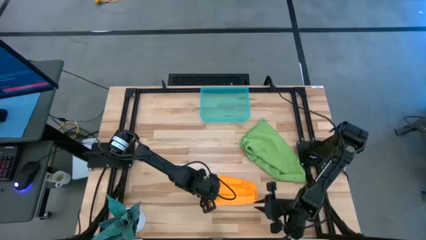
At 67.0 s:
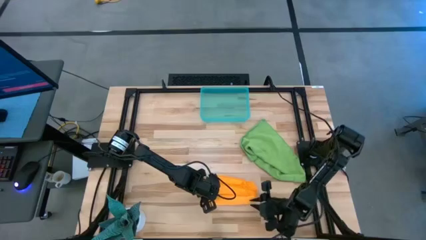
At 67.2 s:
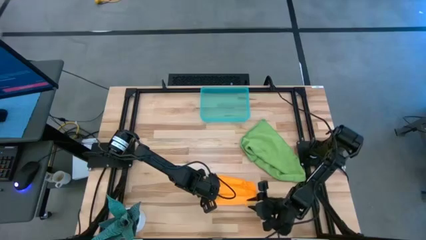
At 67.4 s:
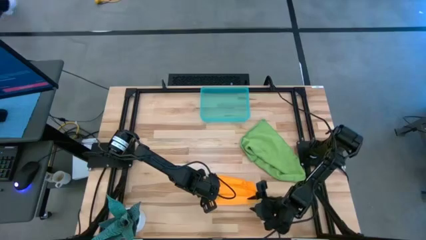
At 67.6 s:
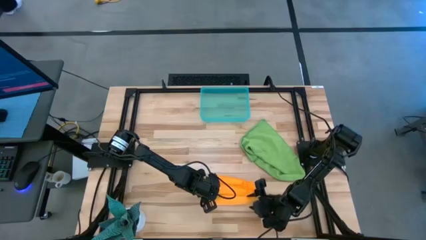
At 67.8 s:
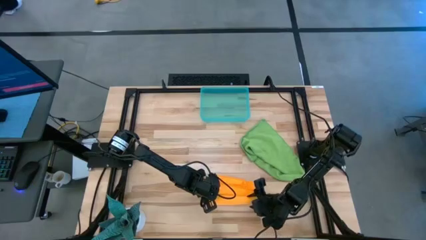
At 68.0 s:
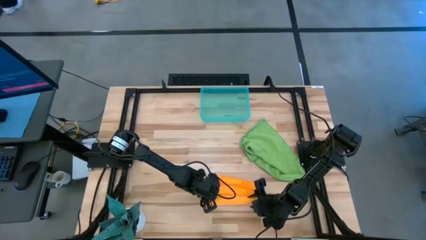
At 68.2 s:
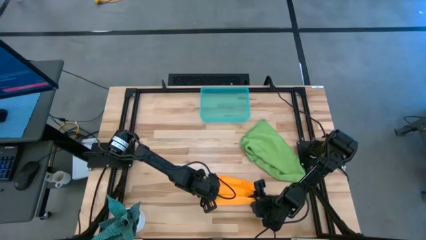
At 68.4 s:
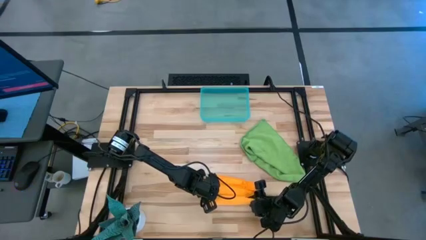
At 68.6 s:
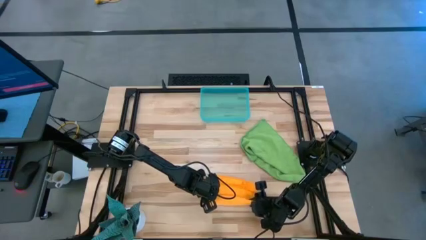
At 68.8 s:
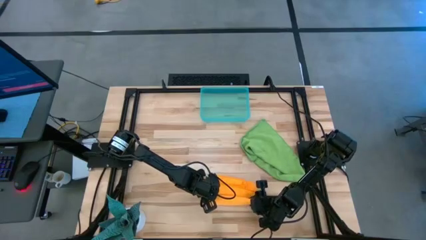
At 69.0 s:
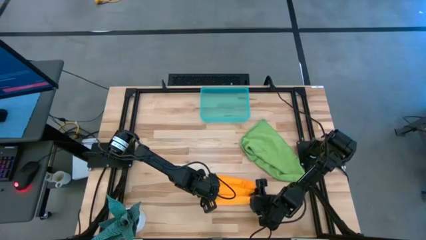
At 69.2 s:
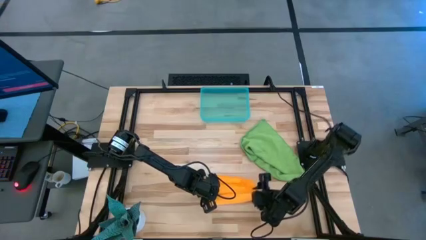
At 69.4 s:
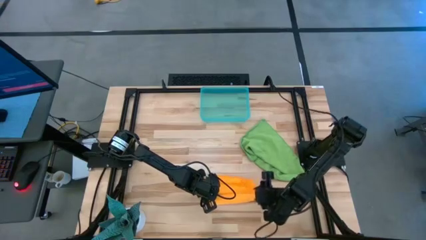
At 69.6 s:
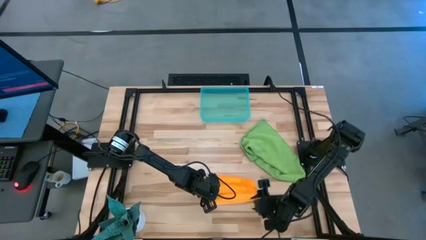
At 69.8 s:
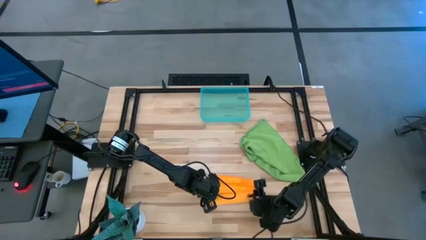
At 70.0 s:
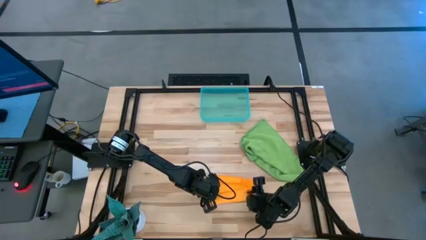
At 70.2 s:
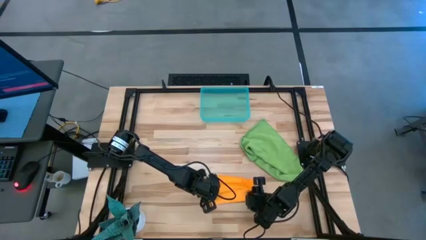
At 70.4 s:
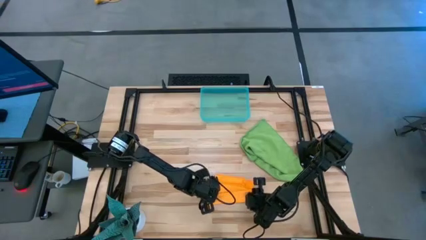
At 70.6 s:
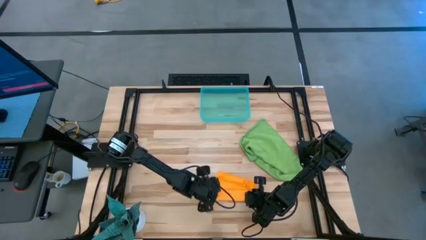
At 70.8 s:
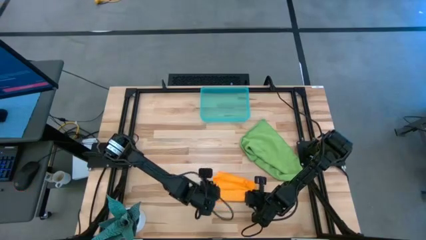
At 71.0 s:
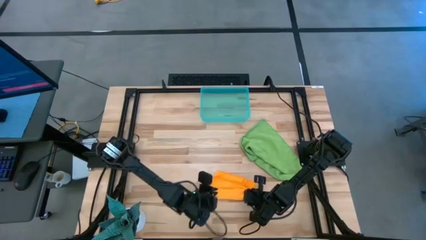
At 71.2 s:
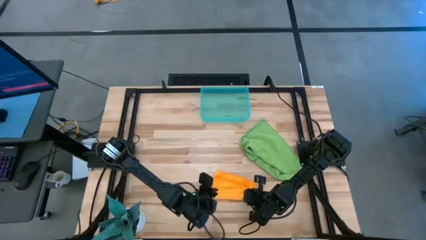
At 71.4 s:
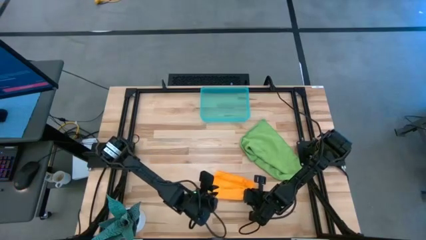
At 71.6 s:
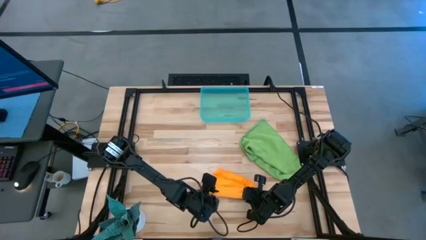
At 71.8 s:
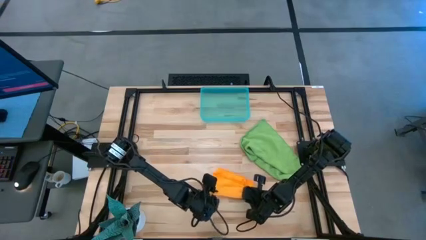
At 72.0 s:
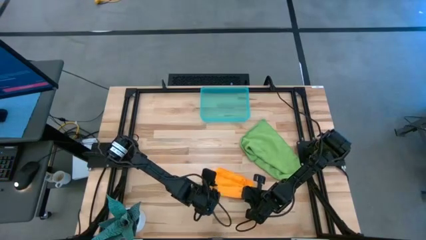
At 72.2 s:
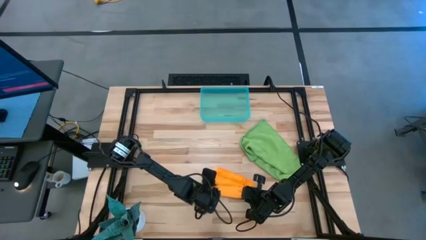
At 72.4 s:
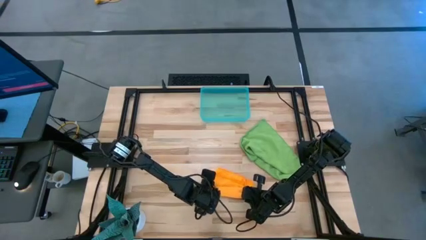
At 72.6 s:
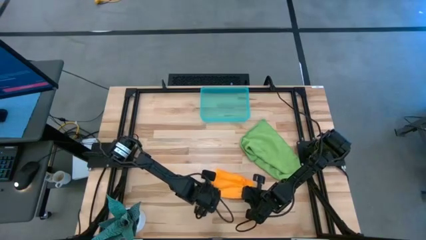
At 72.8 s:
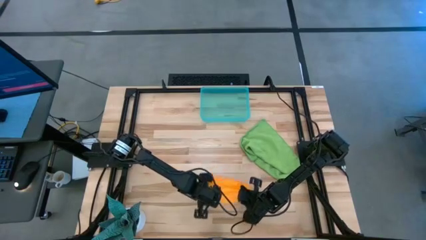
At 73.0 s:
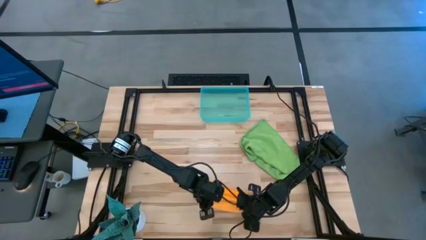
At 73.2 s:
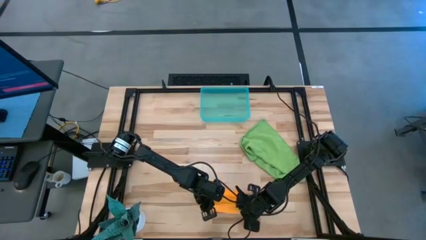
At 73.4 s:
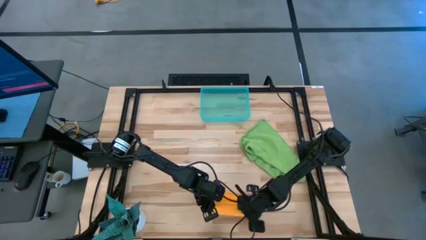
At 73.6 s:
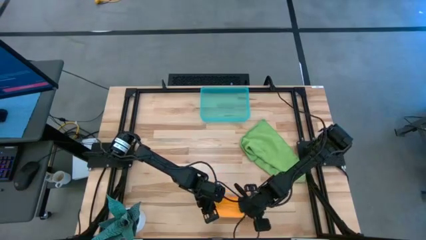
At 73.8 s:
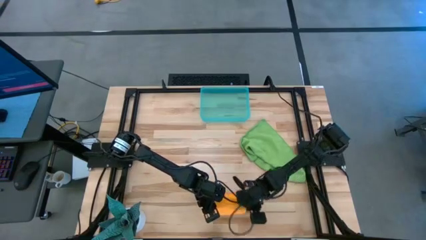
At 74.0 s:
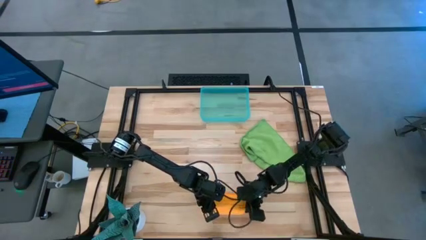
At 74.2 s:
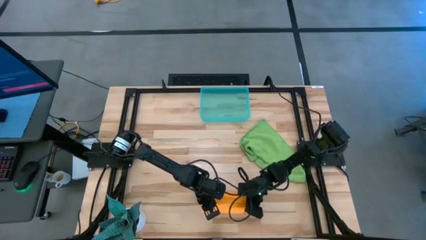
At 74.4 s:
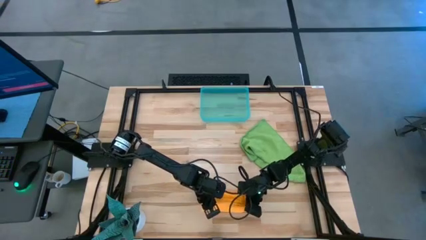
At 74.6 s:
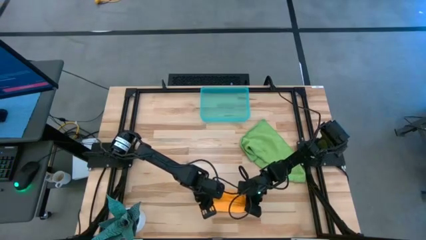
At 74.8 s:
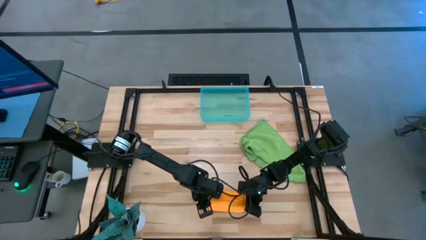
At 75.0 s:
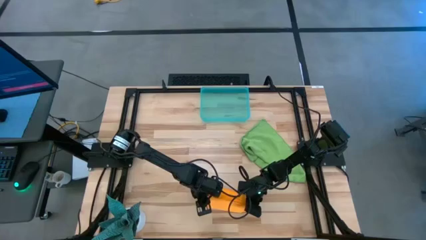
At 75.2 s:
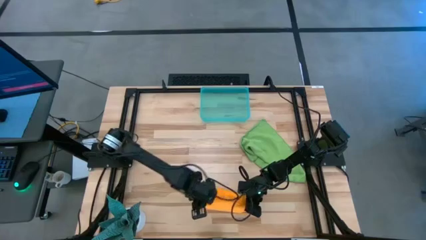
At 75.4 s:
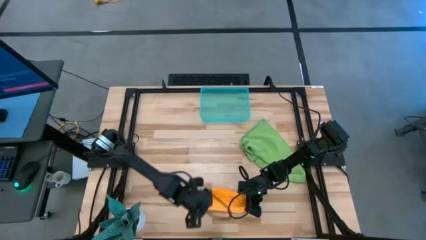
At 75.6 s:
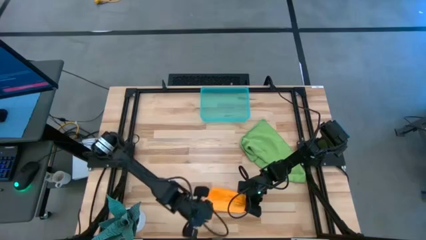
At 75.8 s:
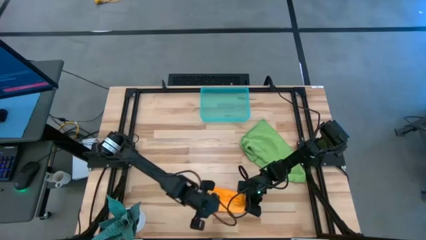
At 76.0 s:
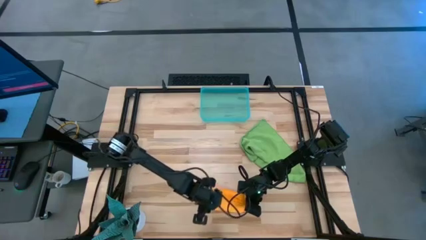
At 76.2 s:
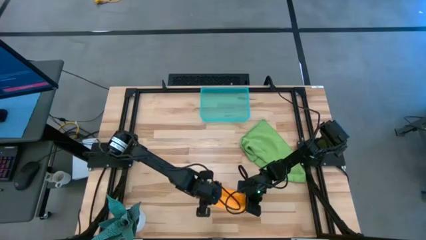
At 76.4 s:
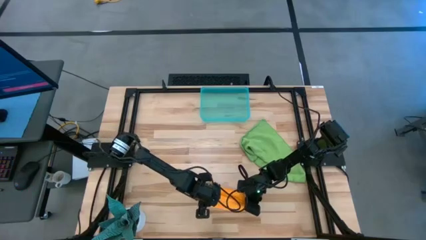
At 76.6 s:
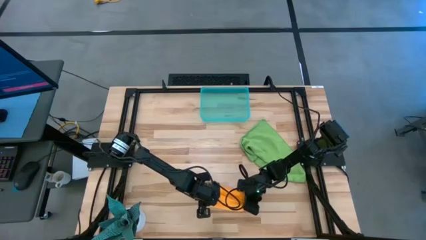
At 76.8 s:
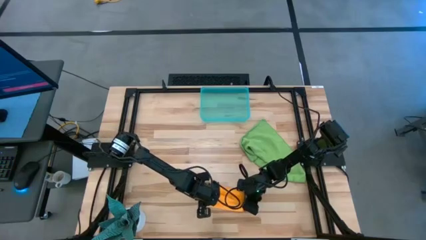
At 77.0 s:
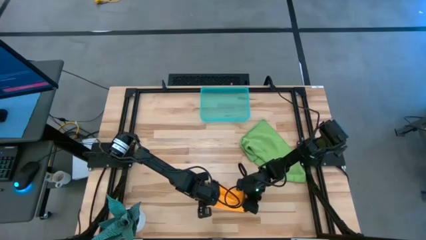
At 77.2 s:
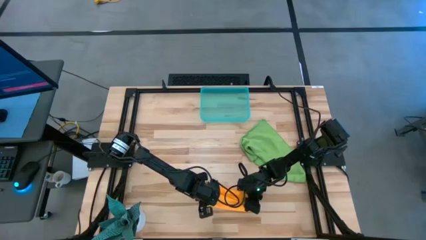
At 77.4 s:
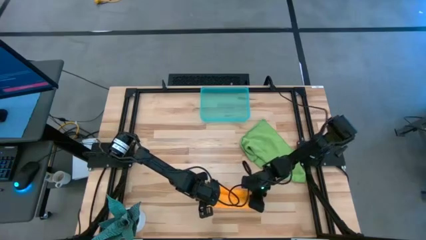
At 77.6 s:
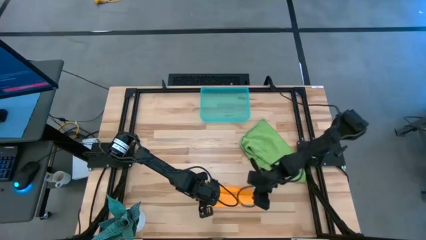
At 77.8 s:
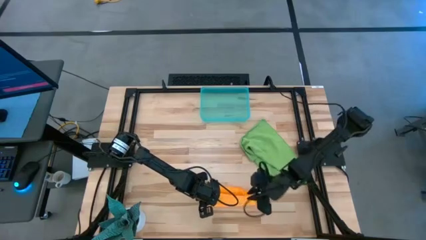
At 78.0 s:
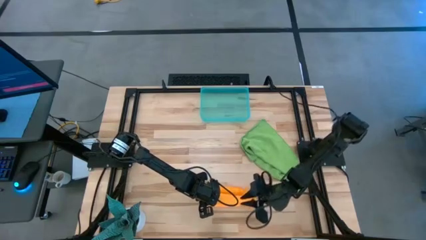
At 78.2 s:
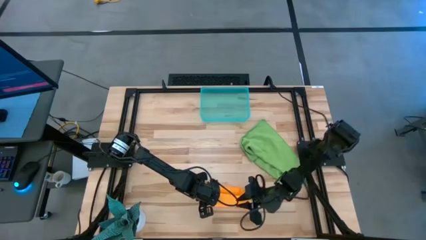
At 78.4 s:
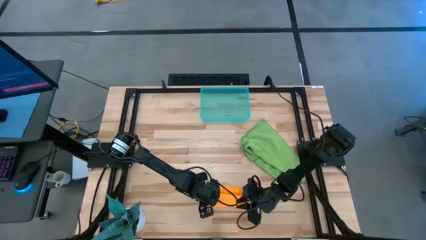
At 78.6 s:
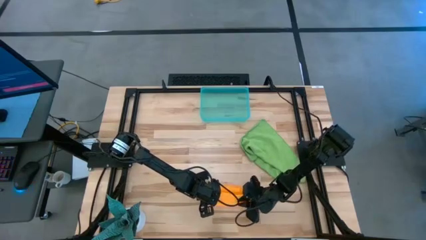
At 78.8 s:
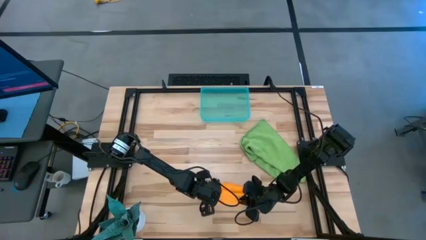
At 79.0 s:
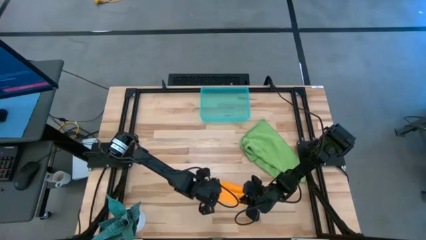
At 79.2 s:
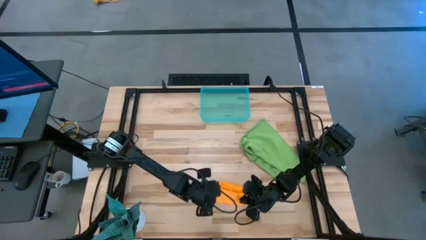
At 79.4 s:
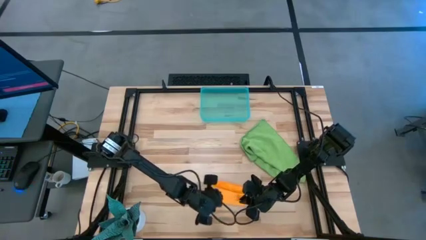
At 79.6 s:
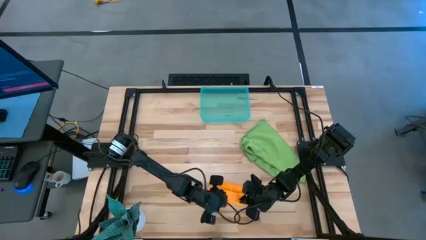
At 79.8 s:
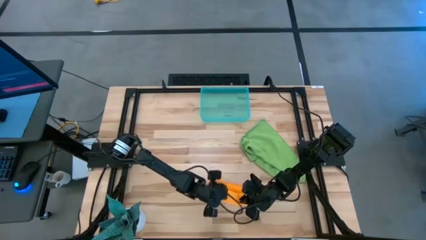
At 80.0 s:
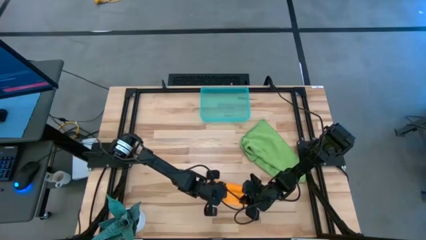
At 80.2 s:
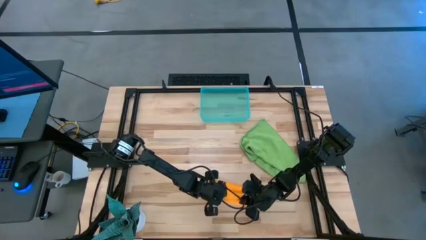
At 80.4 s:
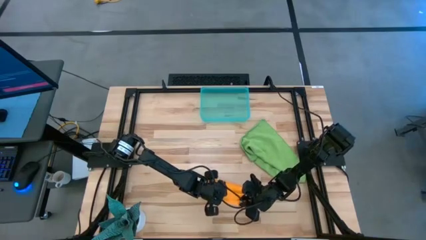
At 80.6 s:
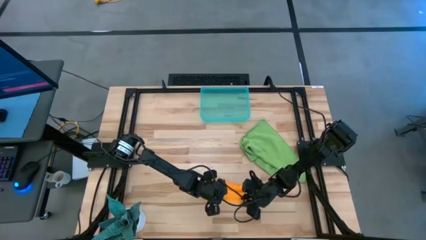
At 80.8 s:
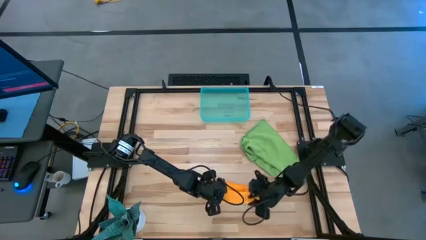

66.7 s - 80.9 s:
Task: Roll microfiber towels into tight, uniform cylinder then place into a basket
Roll the orange microfiber towel
